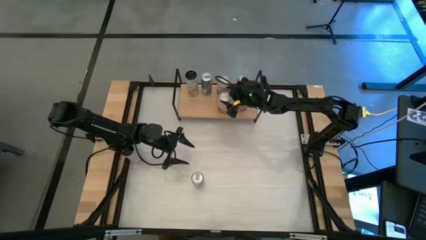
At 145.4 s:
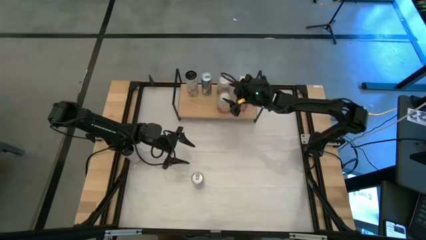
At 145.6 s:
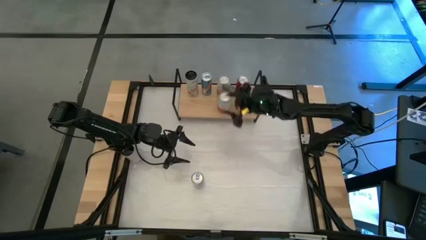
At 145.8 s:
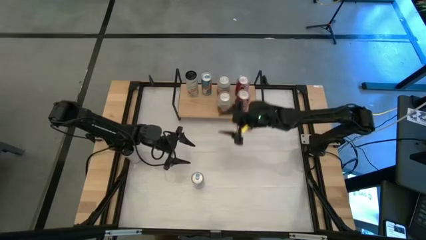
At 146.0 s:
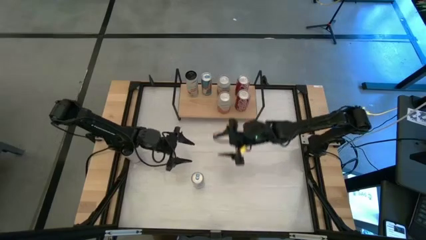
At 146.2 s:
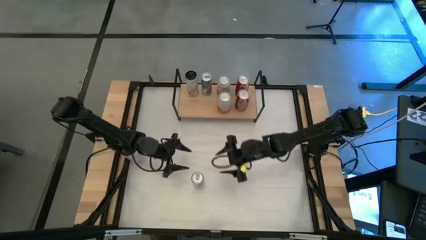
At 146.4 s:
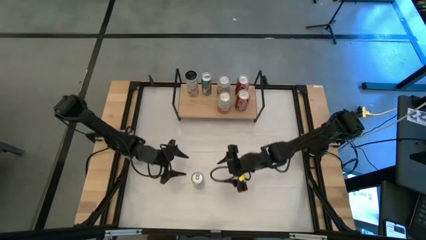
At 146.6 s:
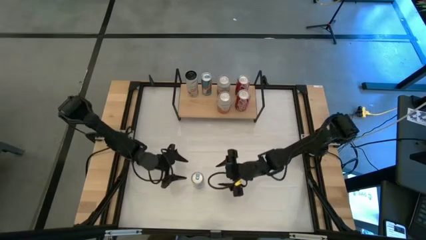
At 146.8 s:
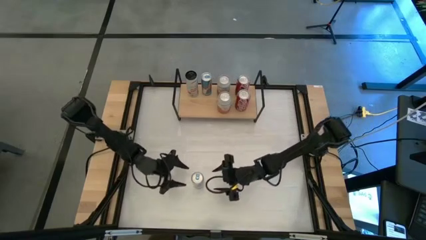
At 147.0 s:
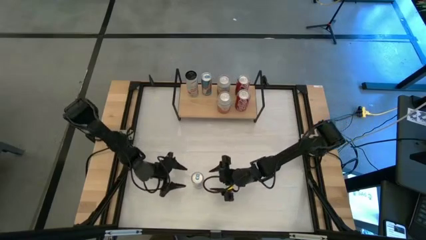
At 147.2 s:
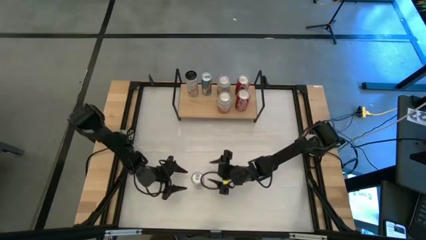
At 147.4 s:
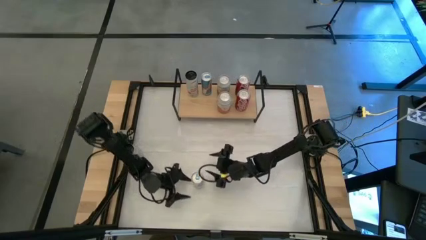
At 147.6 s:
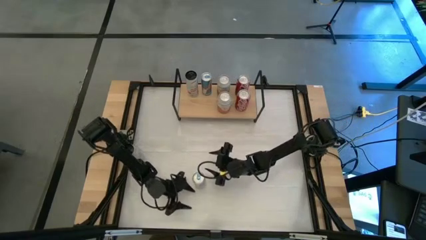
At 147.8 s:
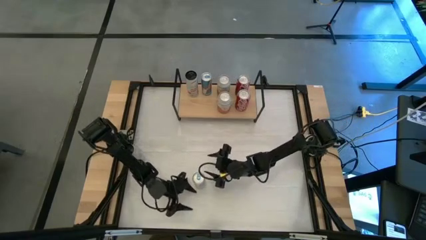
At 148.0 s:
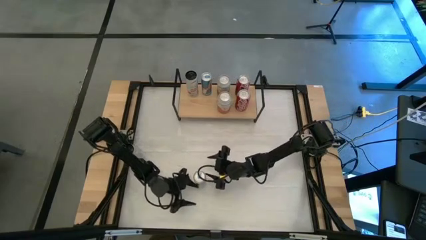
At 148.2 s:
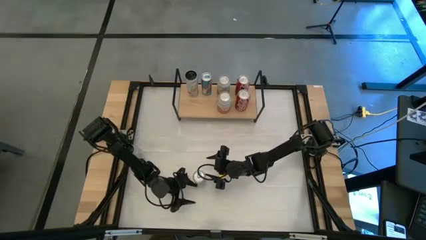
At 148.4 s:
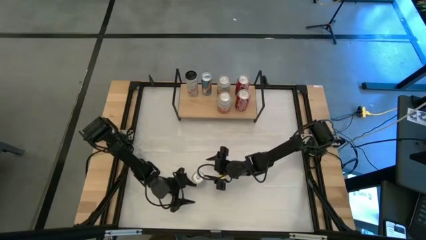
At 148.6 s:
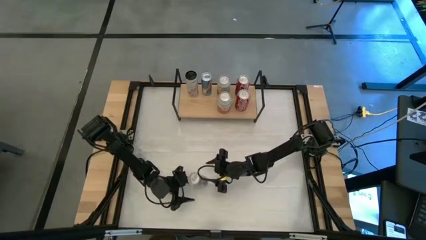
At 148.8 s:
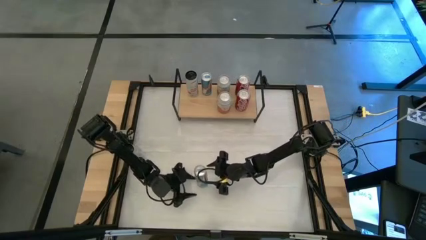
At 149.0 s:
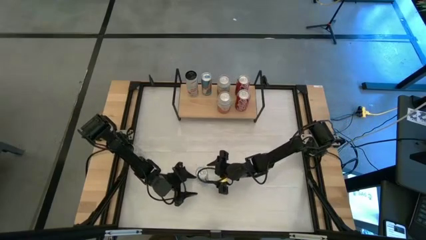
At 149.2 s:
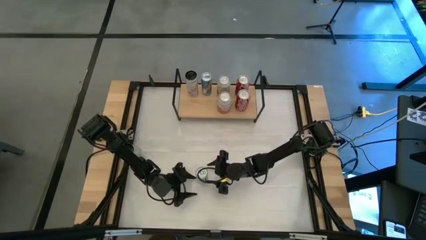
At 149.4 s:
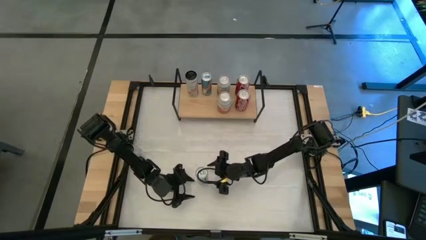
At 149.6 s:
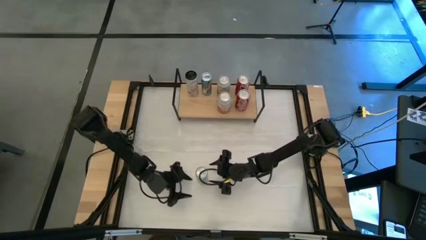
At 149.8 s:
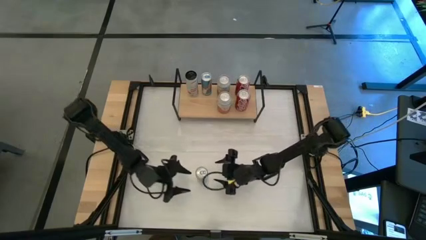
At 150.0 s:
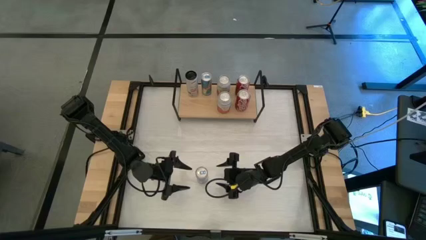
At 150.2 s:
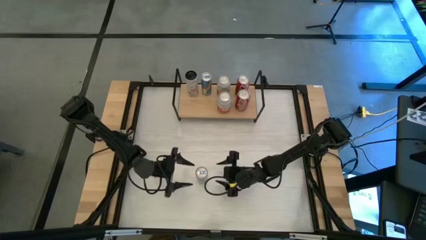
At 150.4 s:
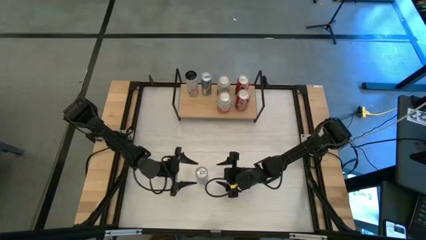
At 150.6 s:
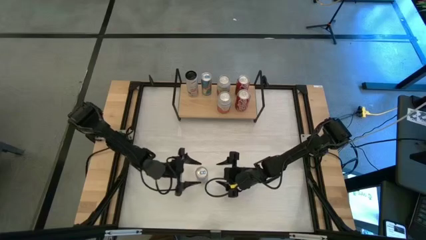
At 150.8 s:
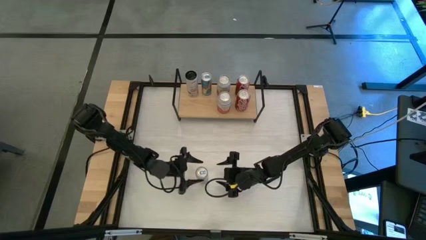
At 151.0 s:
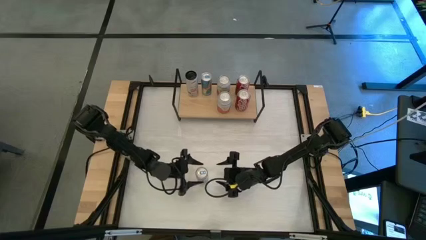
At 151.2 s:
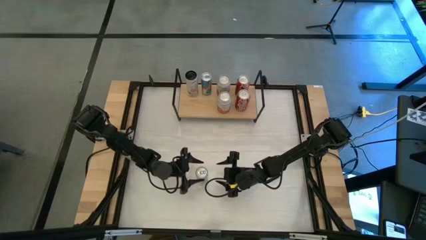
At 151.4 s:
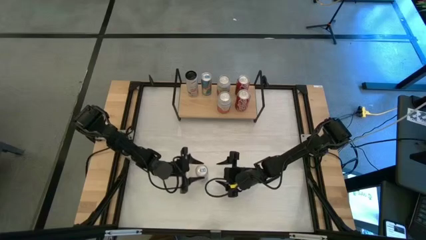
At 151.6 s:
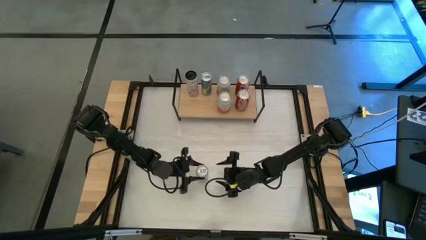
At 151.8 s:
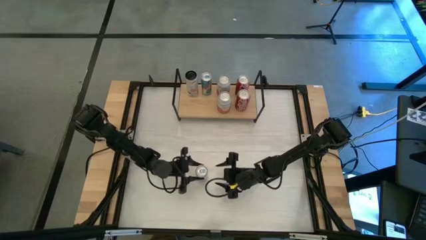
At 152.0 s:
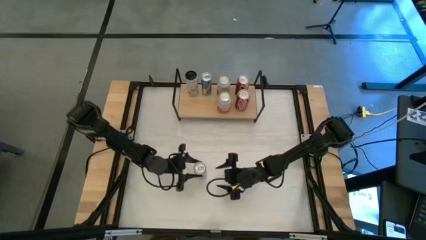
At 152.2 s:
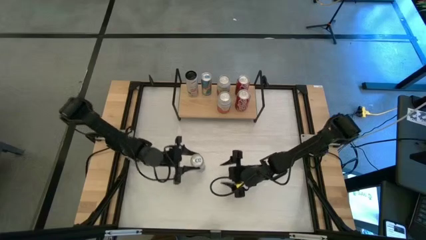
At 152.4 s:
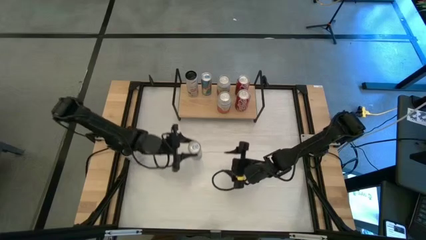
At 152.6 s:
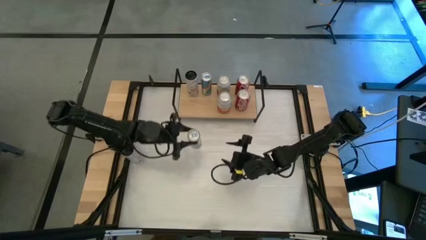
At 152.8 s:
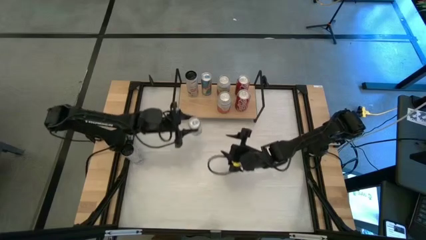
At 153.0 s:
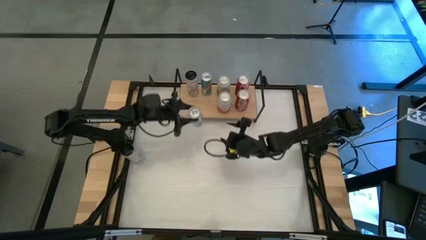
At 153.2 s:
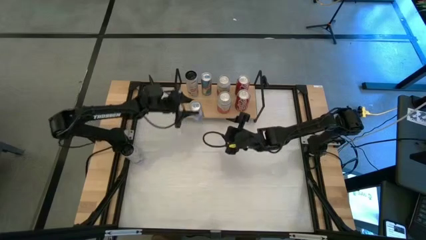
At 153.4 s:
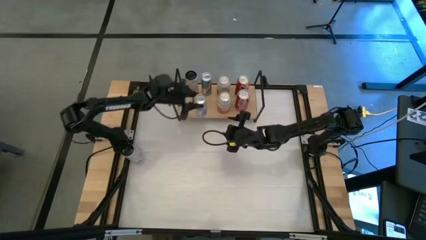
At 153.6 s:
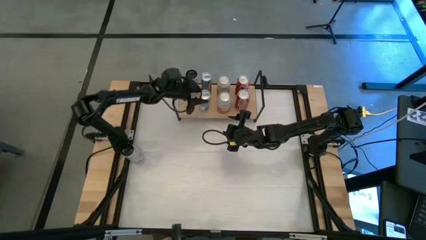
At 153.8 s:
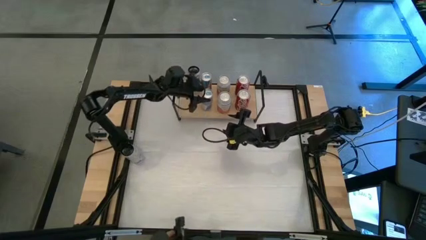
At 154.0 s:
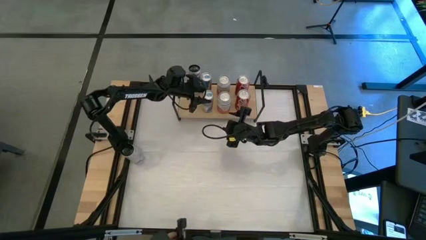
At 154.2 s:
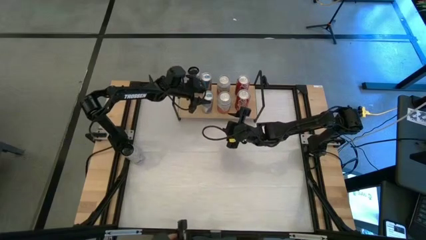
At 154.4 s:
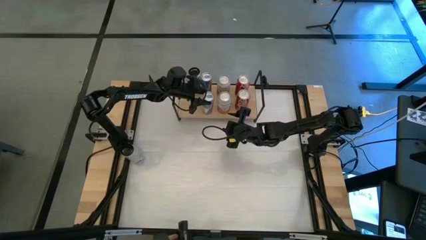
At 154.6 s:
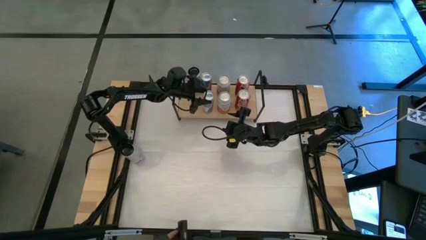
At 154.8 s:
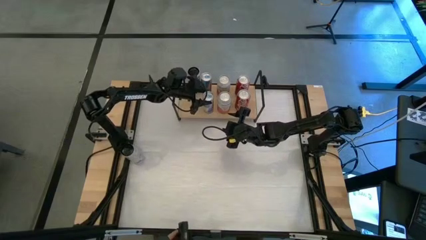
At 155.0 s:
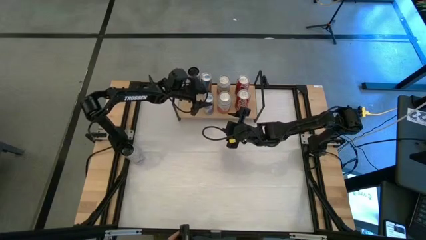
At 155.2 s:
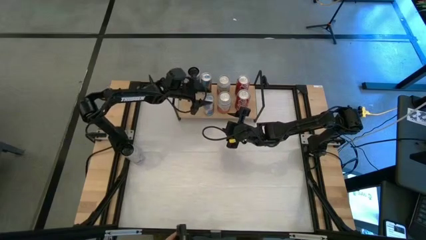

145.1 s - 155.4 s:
Task: Place canned beverage on shelf
Put the blue soda can align with the other blue soda can on the shelf

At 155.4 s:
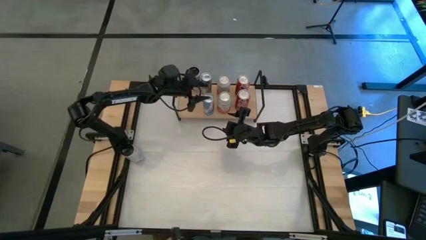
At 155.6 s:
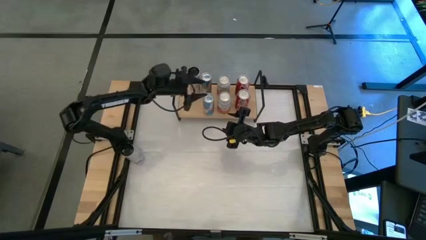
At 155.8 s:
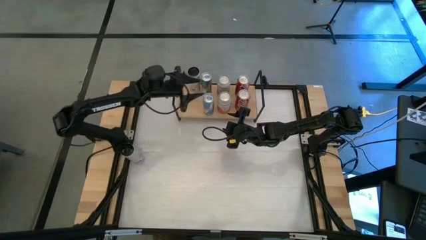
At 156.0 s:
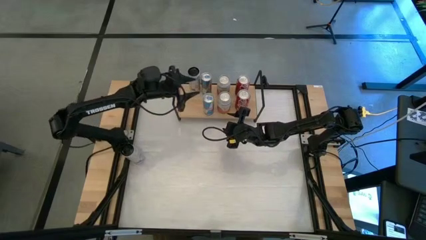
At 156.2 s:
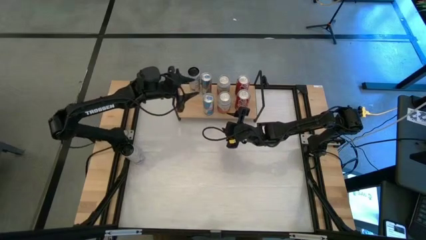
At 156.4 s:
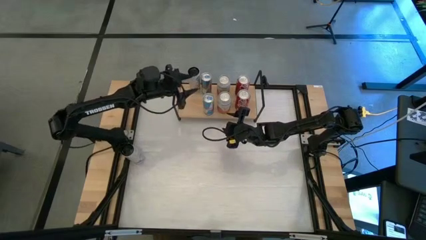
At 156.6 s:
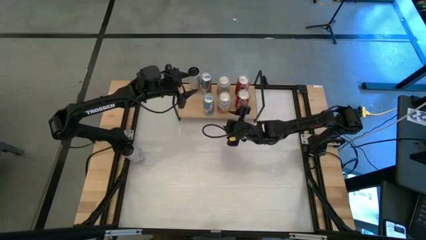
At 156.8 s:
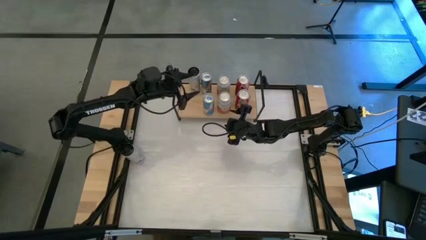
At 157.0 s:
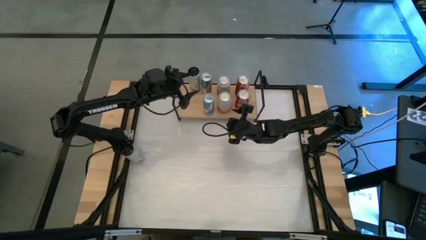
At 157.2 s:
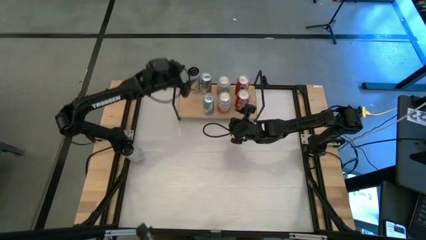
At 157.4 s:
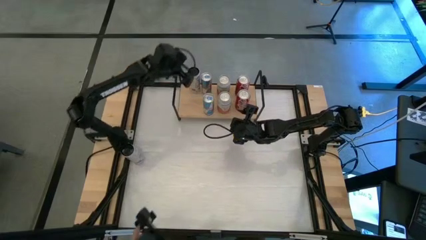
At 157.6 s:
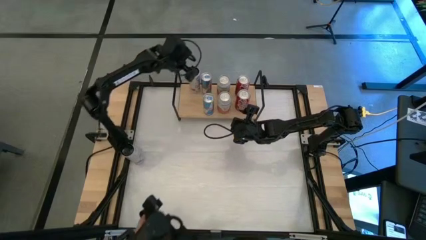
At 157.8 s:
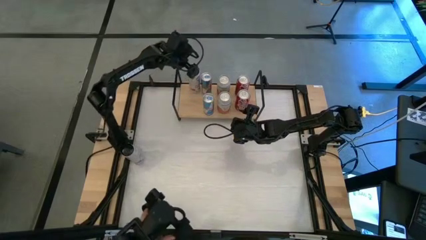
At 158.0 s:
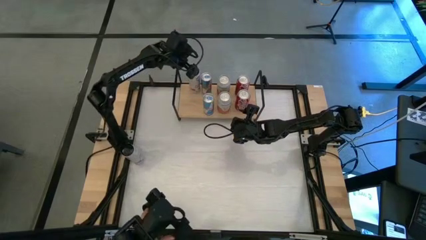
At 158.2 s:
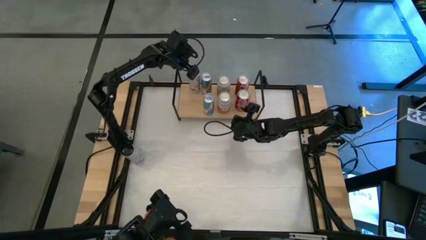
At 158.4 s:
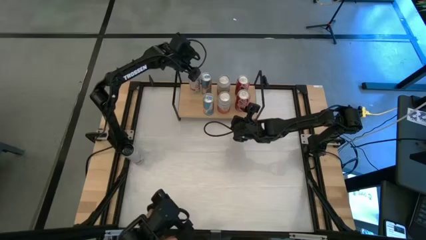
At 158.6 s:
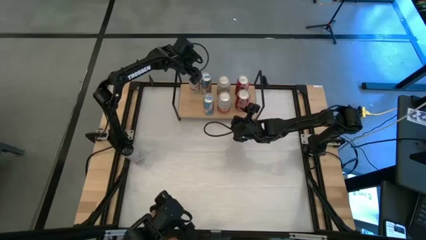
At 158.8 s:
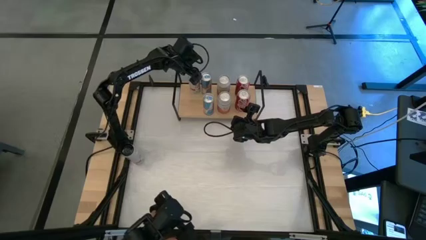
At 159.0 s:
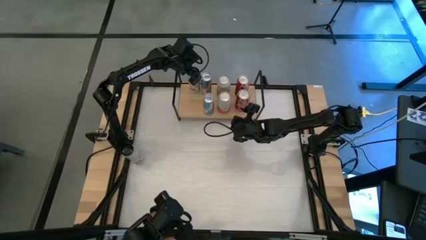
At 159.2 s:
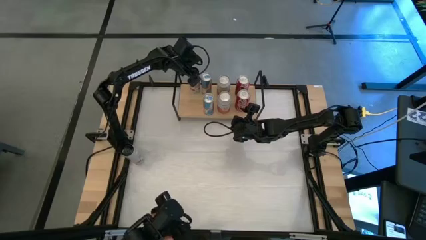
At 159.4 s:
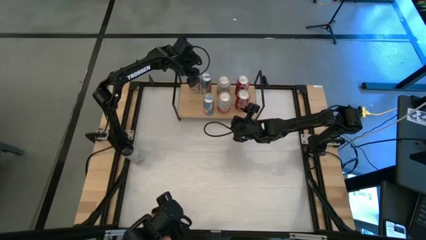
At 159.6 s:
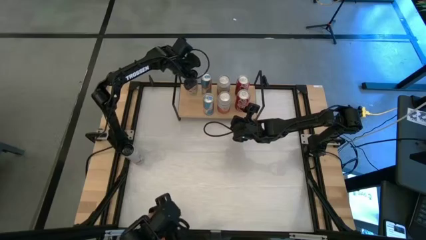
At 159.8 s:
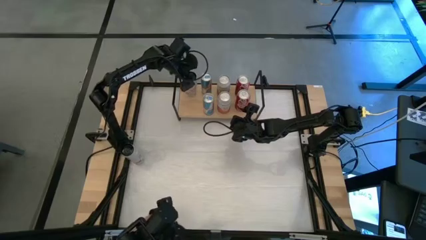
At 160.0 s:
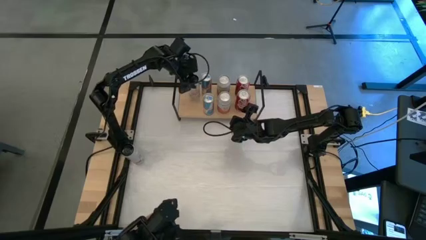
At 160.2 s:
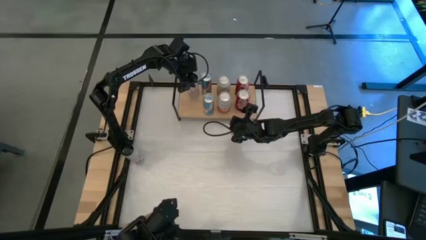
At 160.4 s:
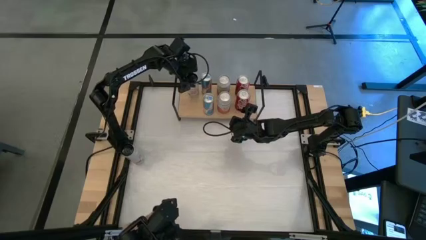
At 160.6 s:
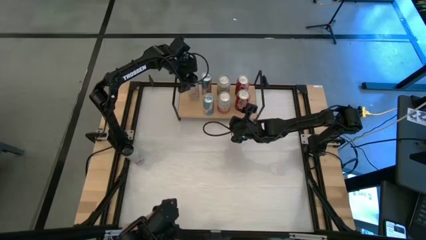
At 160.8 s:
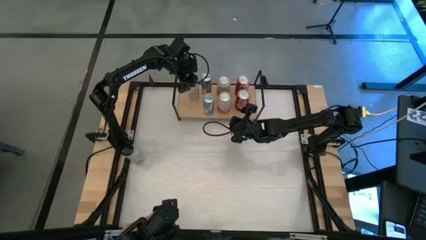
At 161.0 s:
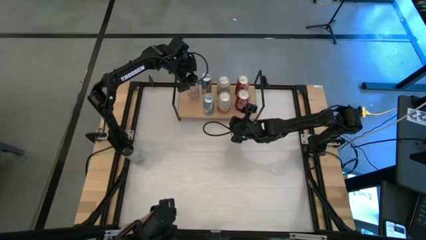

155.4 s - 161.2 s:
Adjust the white pink soda can on the shelf
